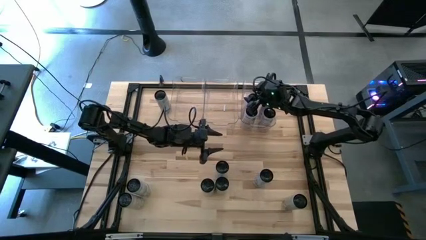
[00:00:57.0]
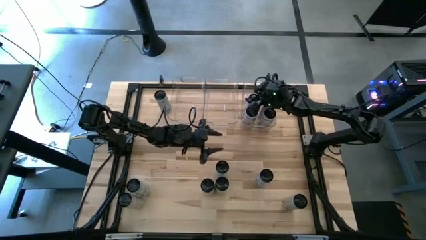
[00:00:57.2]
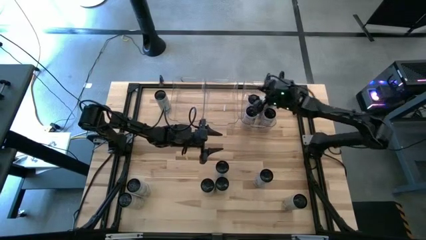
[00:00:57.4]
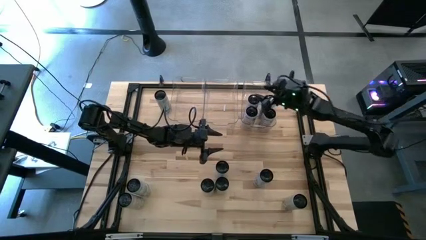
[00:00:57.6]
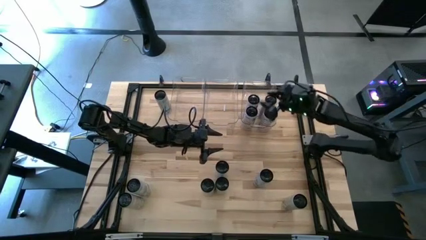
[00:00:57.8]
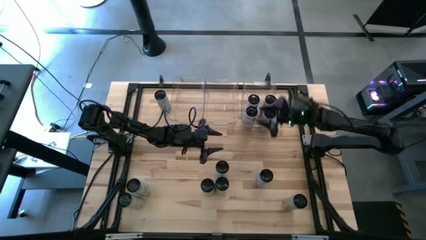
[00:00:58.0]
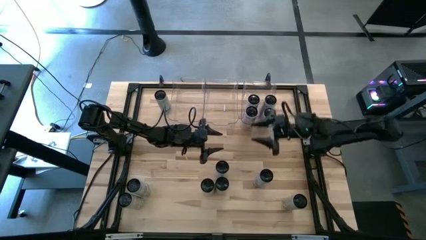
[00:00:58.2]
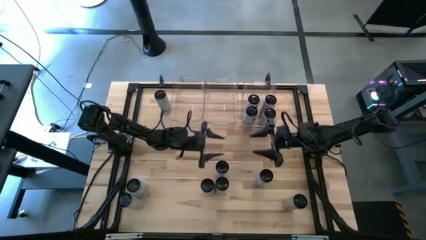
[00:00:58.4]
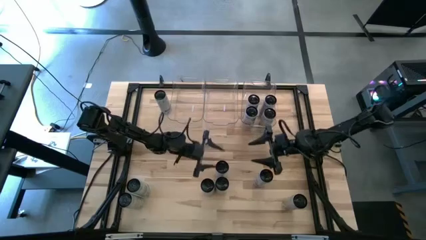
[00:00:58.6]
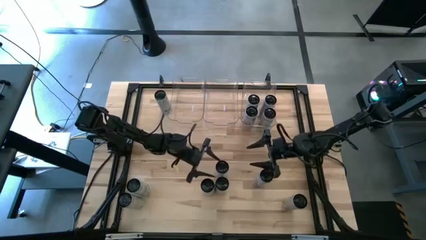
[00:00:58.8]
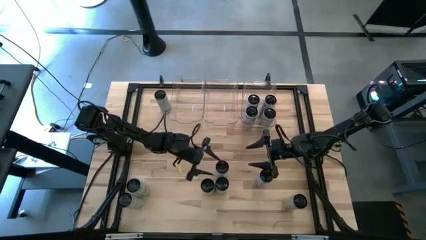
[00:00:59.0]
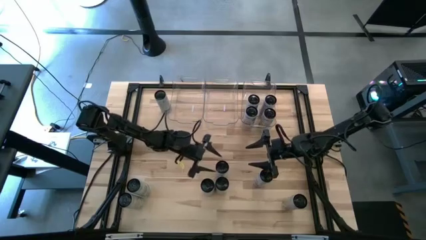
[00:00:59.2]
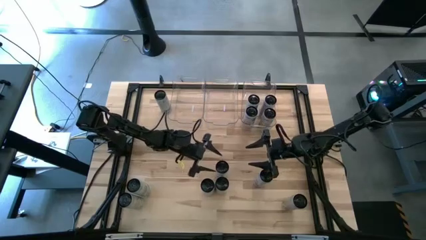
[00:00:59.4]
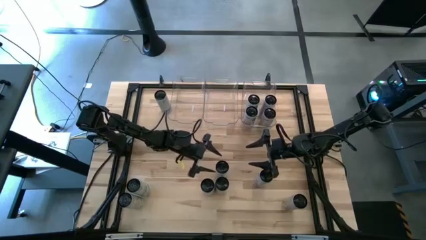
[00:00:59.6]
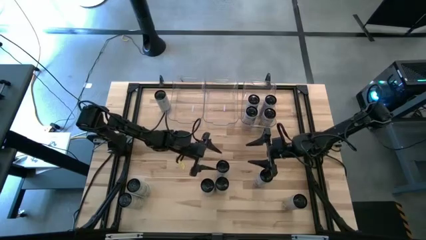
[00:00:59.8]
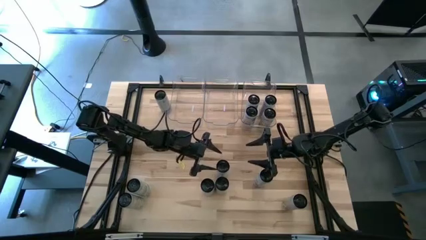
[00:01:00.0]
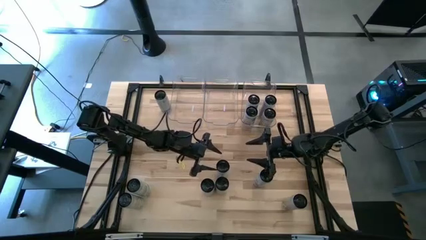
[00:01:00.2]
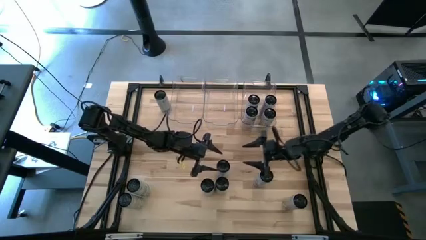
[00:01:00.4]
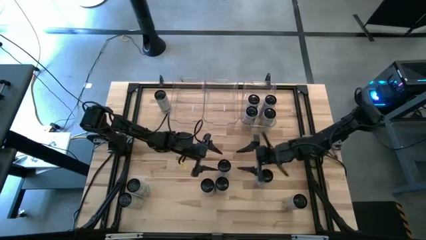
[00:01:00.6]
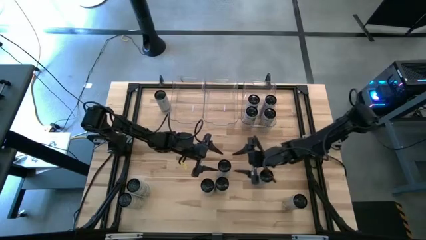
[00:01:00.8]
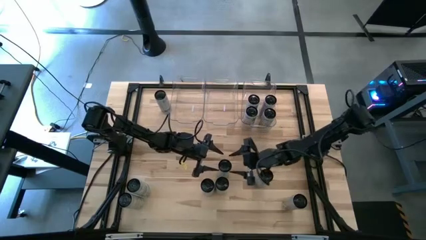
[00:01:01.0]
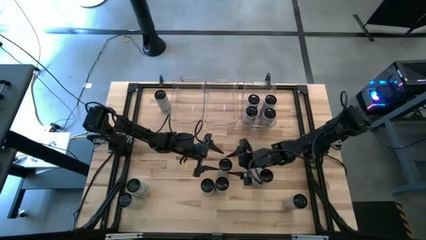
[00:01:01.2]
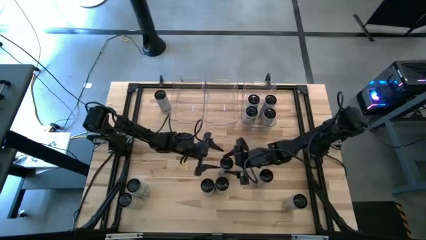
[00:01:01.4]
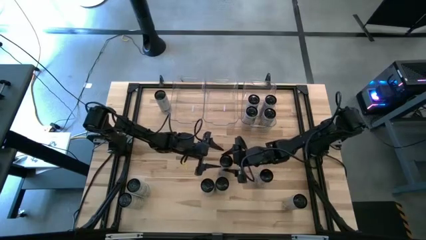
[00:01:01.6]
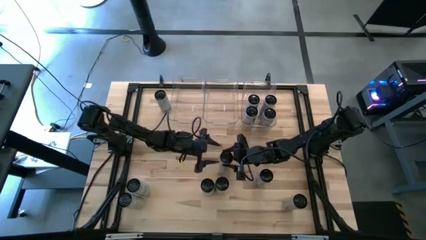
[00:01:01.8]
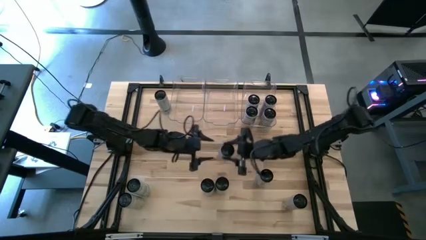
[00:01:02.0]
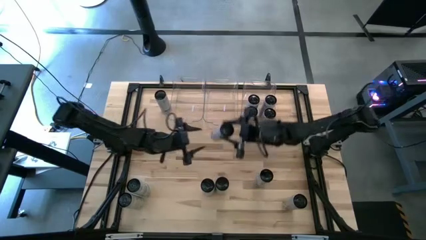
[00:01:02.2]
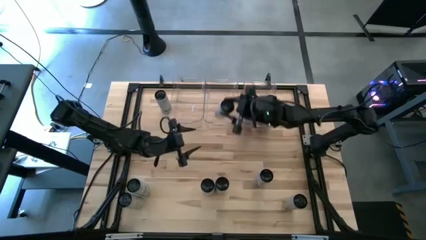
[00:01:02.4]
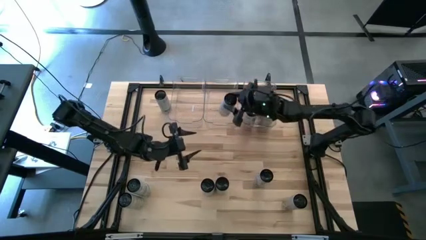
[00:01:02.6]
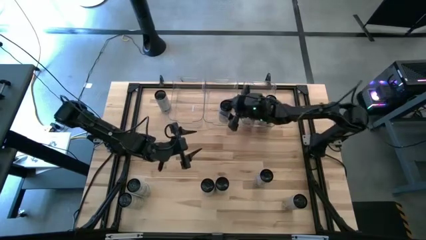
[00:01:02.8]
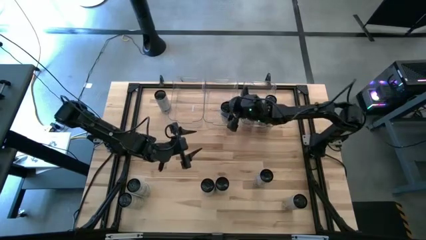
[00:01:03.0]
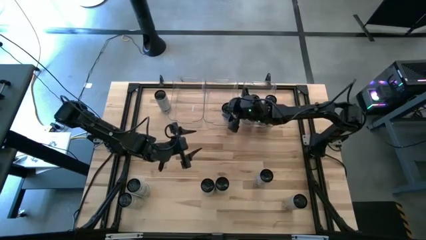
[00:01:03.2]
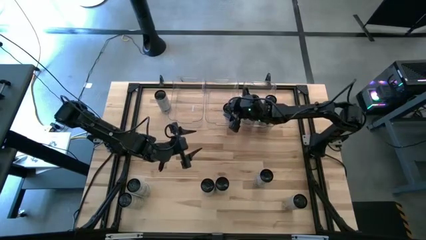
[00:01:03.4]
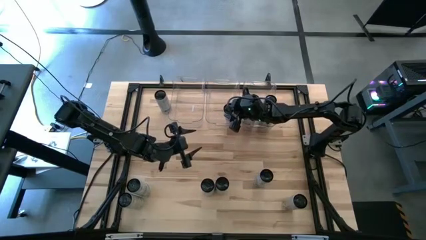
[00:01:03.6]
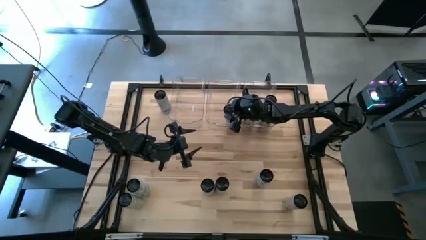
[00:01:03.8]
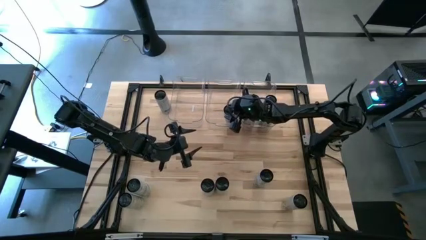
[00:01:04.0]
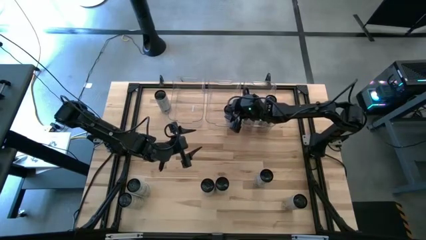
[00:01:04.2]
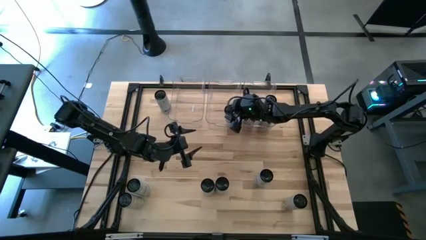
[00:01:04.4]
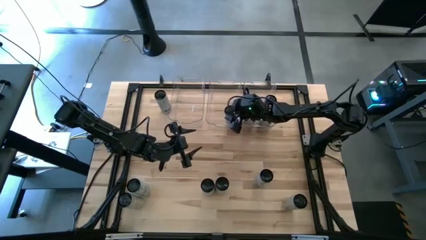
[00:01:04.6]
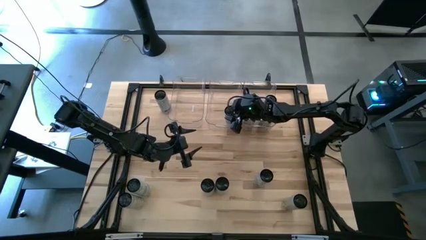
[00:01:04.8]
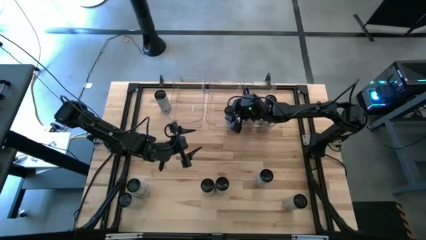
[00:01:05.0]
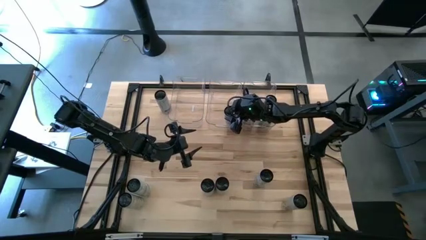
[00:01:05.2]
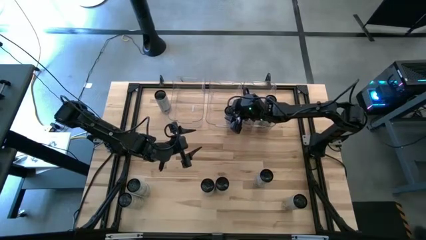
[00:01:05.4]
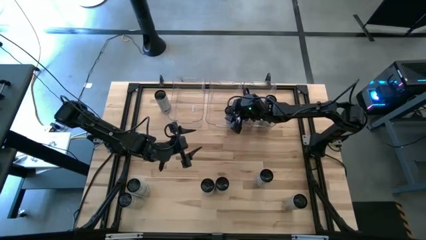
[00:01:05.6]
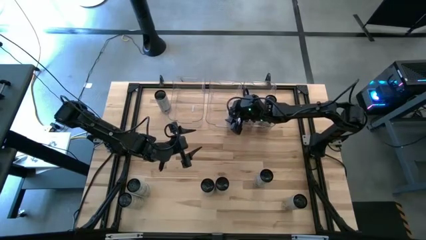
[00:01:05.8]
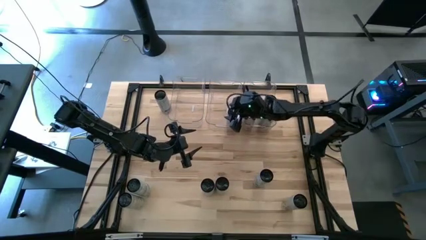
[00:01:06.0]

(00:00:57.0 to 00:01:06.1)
Task: Sort soda cans
Put the center white-blue soda can into the middle transparent bin

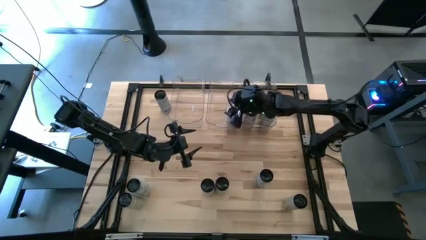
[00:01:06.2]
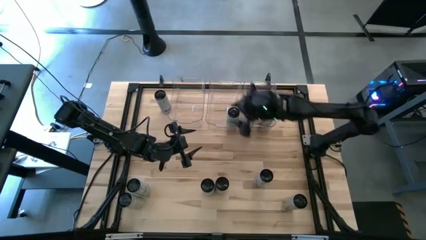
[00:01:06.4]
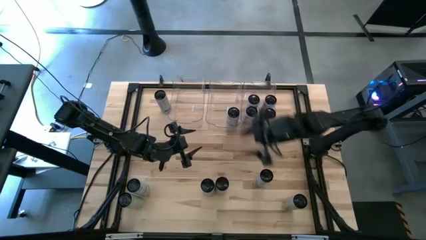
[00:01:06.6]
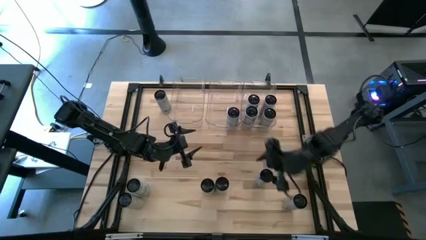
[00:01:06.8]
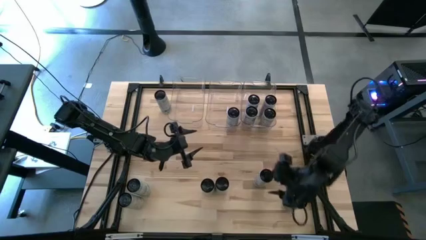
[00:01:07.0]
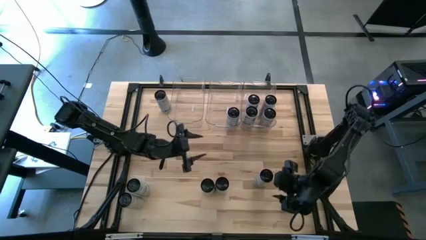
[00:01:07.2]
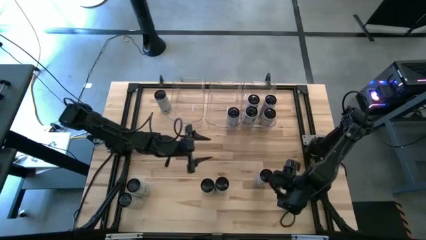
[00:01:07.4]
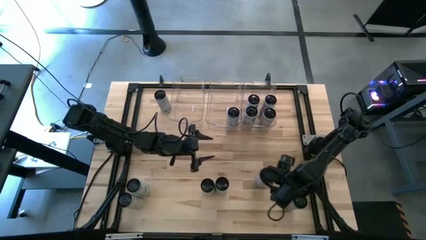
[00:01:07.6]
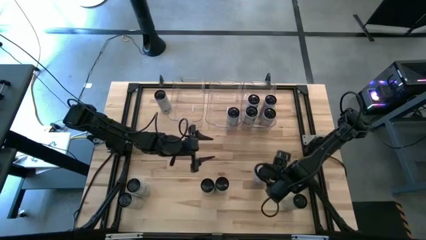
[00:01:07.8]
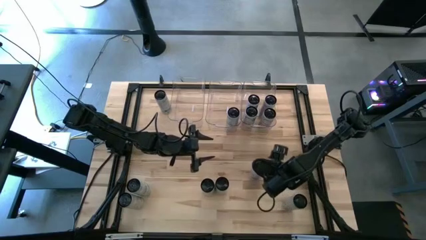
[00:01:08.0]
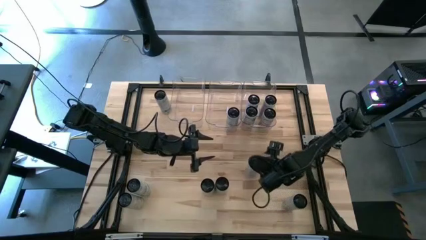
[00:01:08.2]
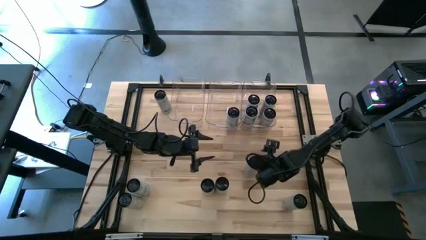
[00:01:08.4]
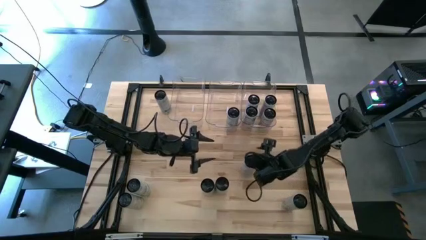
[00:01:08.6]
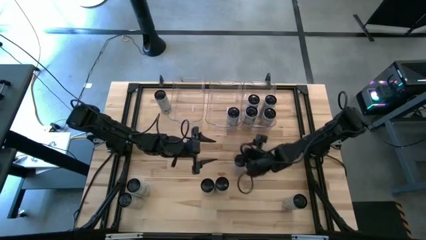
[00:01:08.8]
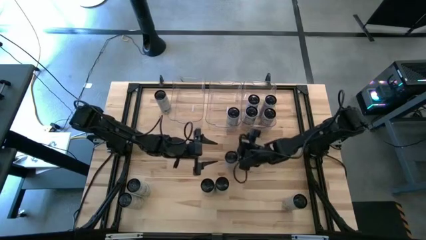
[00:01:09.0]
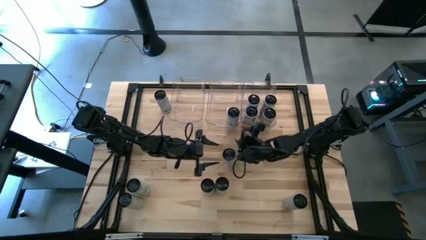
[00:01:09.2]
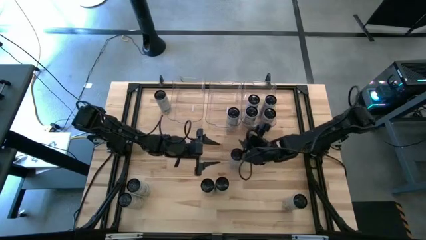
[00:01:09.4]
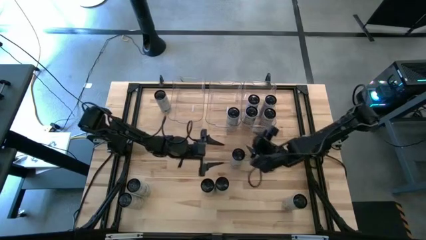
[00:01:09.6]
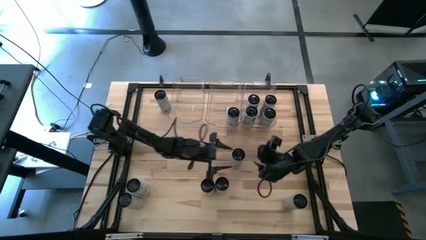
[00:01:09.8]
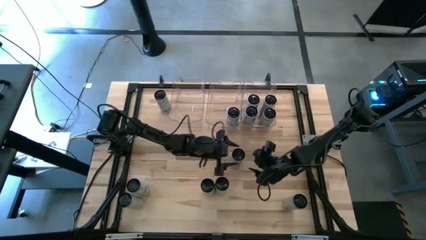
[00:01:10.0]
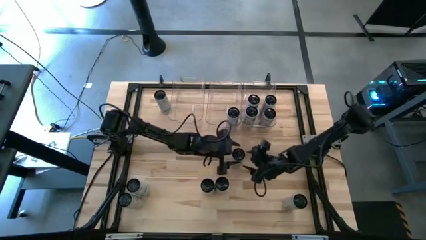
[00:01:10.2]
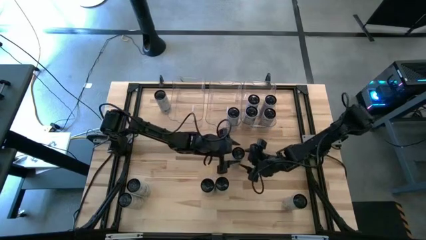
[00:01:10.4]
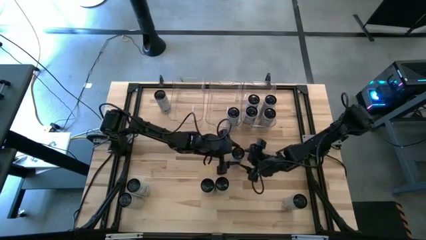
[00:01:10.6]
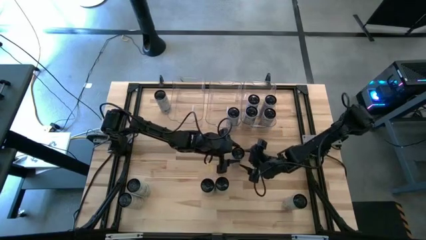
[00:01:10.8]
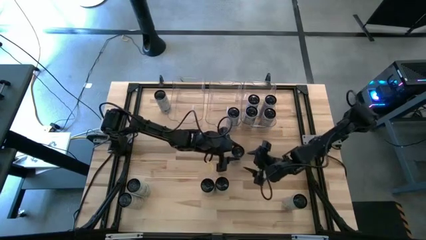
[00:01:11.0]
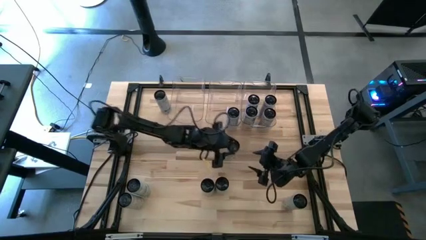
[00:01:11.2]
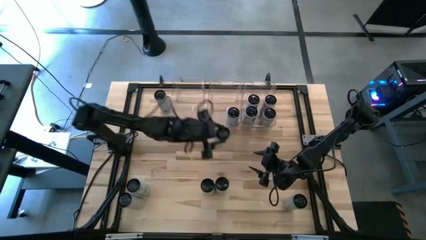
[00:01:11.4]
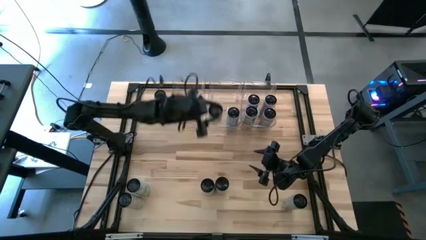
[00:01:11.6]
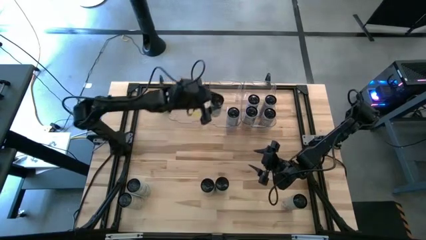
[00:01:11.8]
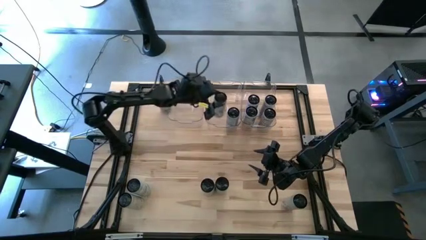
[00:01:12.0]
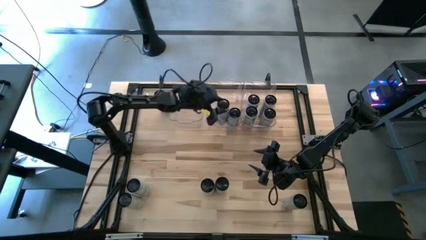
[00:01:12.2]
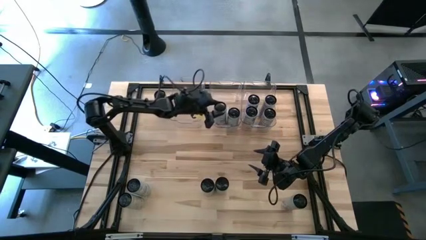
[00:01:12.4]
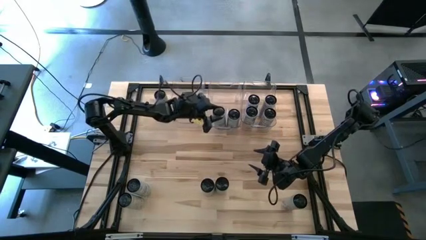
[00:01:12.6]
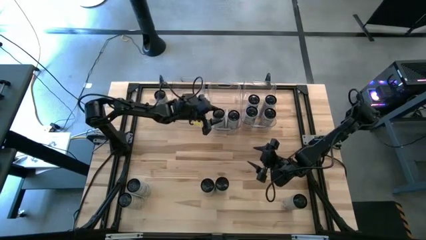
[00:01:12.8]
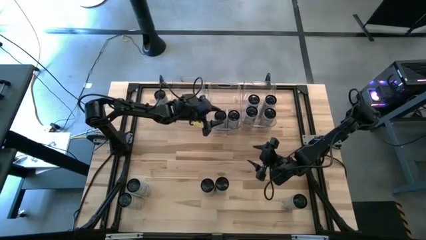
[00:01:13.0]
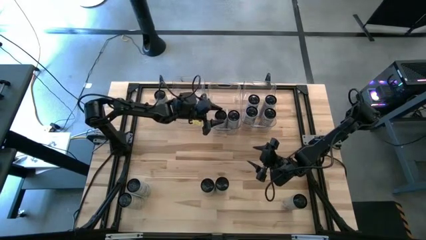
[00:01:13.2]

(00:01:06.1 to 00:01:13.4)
Put the bottom right white-blue soda can into the middle transparent bin
